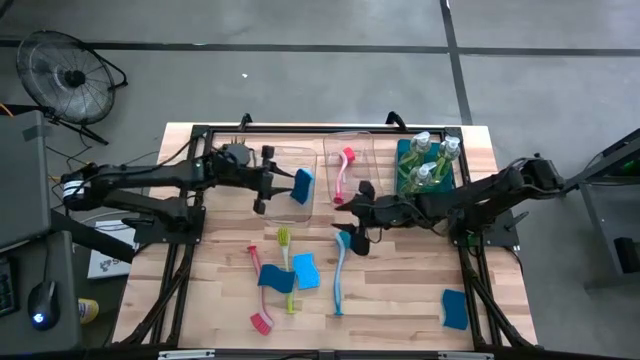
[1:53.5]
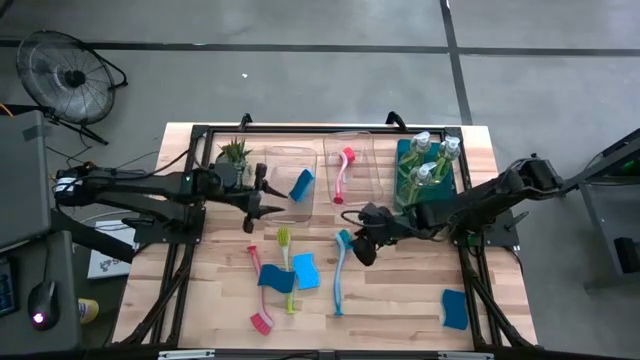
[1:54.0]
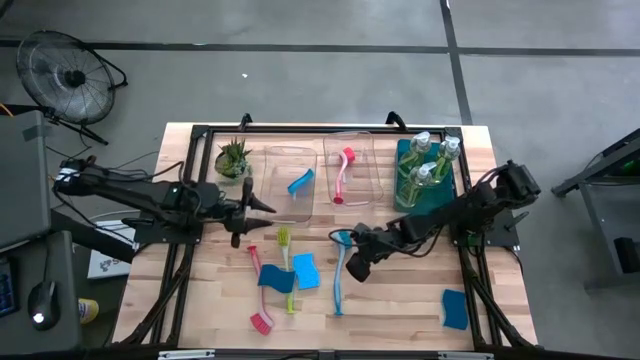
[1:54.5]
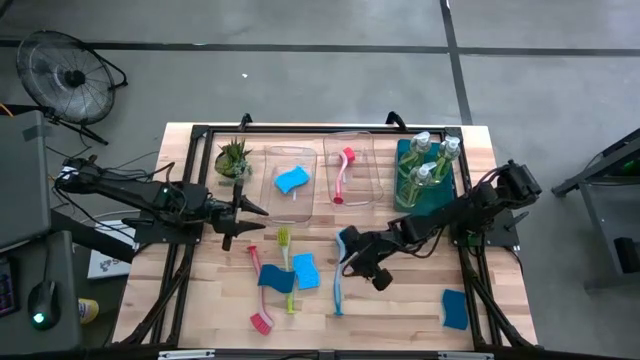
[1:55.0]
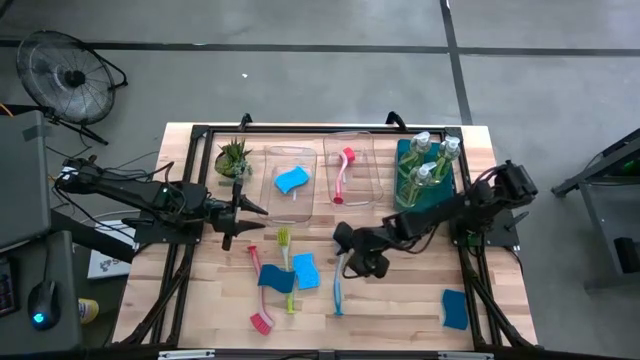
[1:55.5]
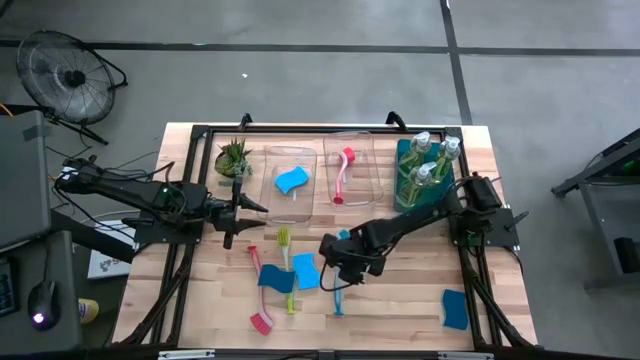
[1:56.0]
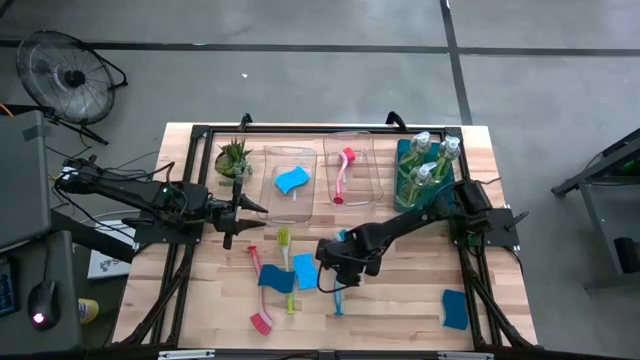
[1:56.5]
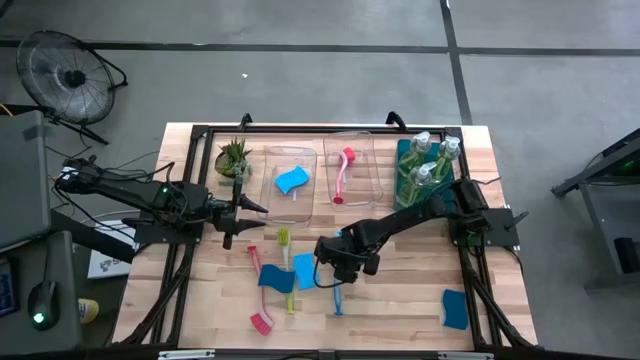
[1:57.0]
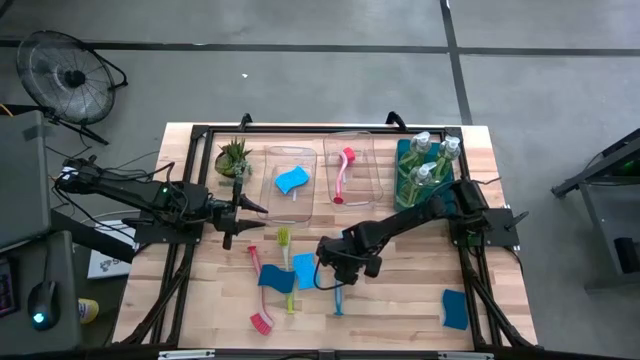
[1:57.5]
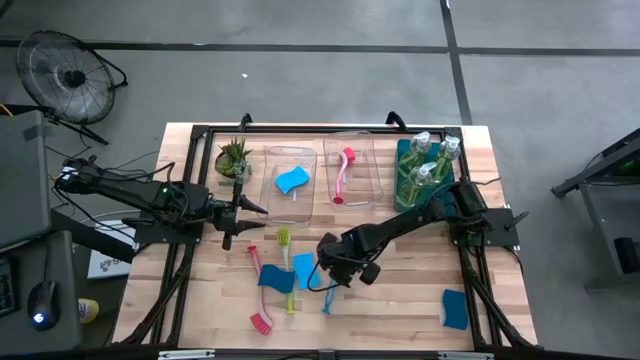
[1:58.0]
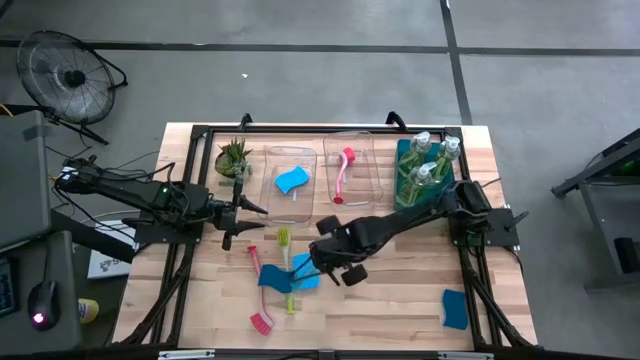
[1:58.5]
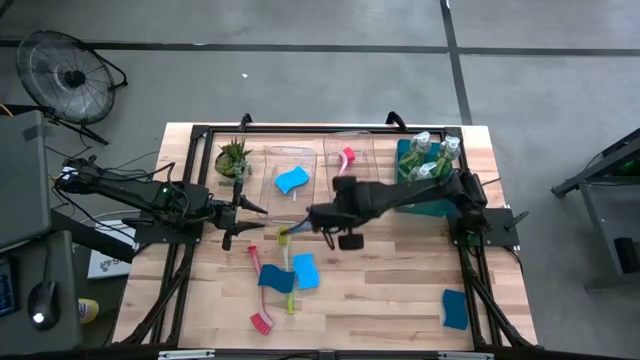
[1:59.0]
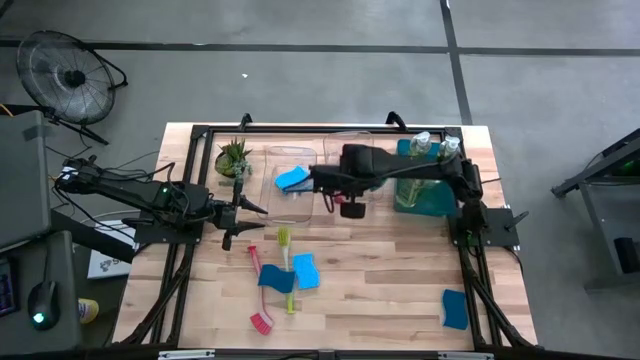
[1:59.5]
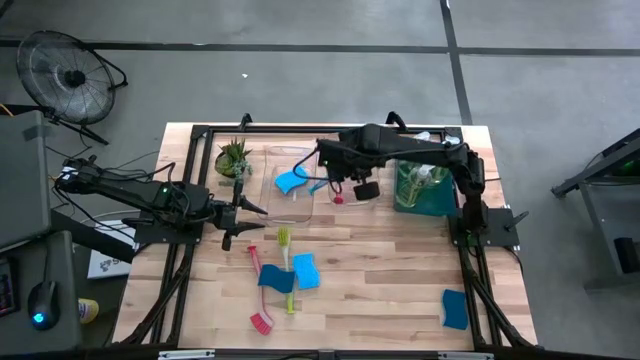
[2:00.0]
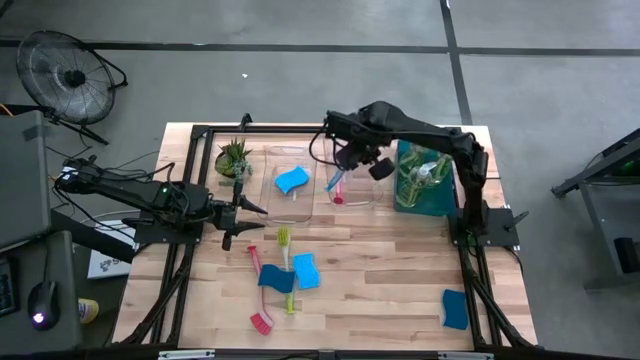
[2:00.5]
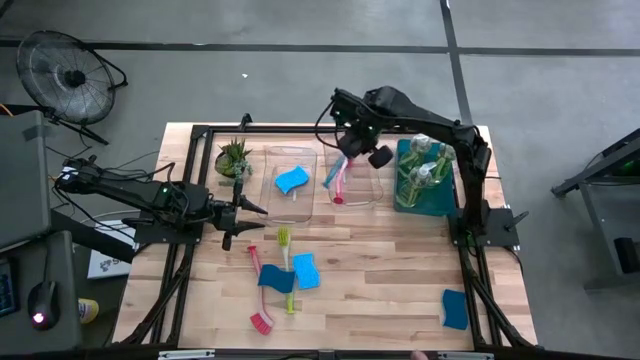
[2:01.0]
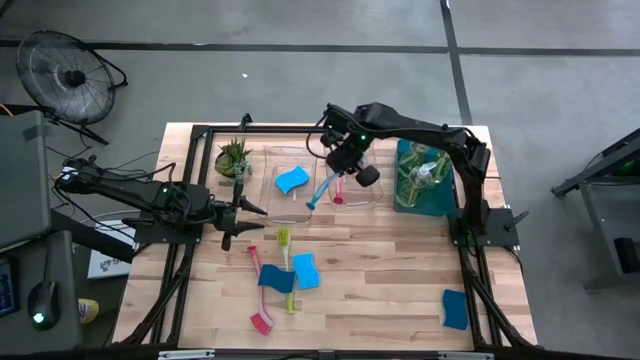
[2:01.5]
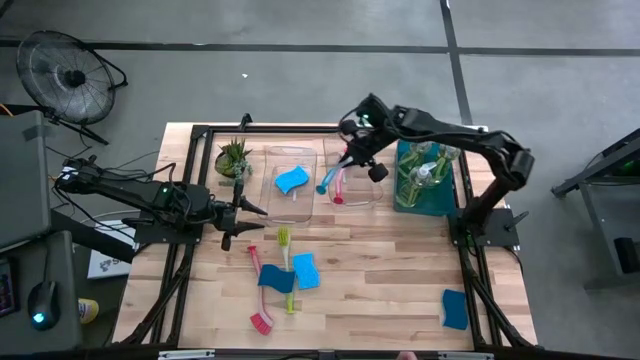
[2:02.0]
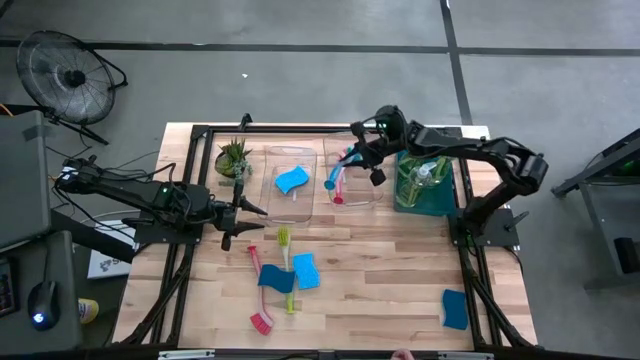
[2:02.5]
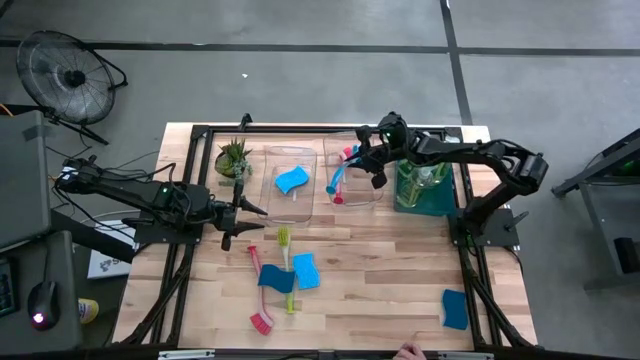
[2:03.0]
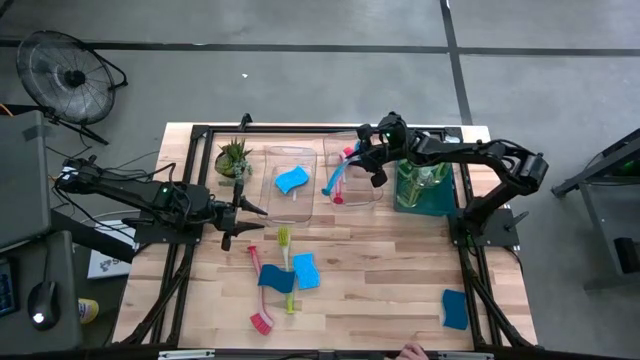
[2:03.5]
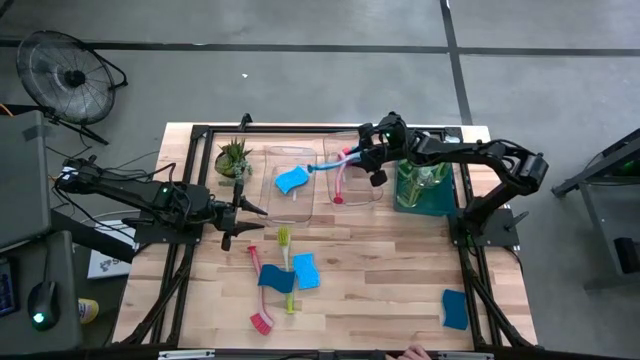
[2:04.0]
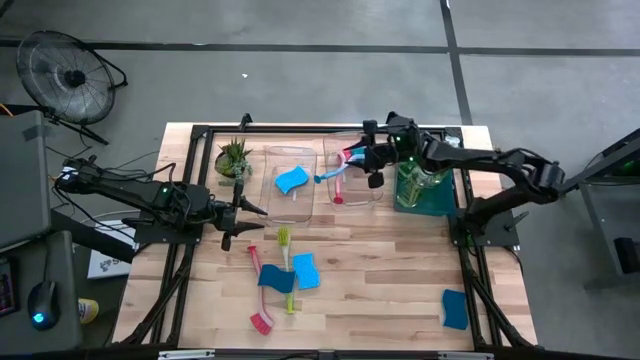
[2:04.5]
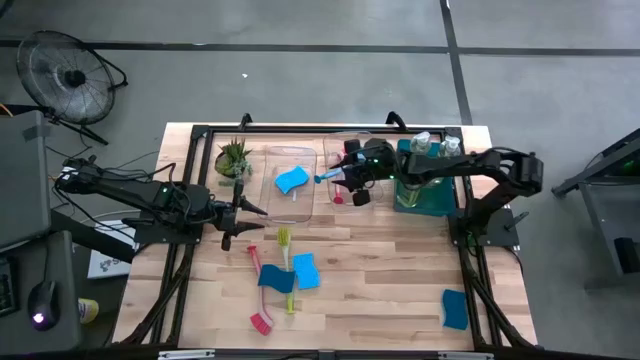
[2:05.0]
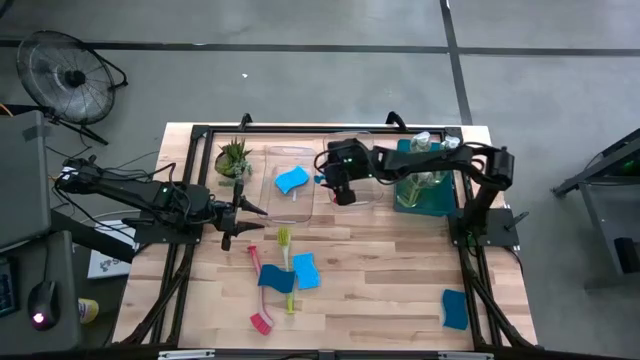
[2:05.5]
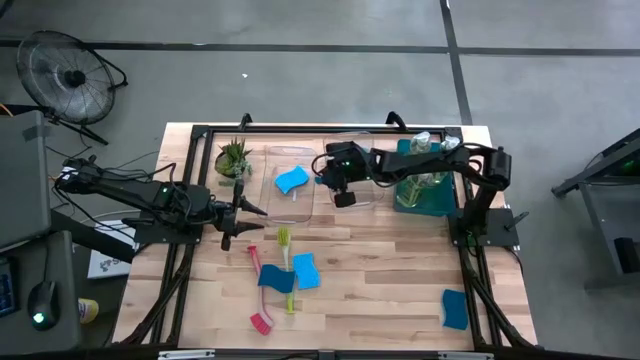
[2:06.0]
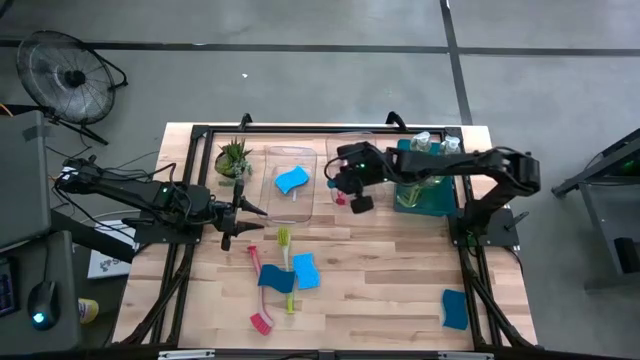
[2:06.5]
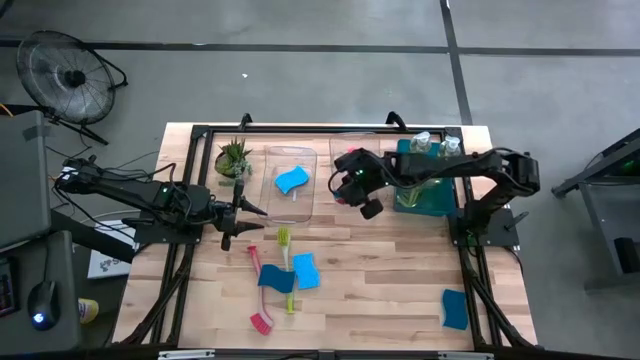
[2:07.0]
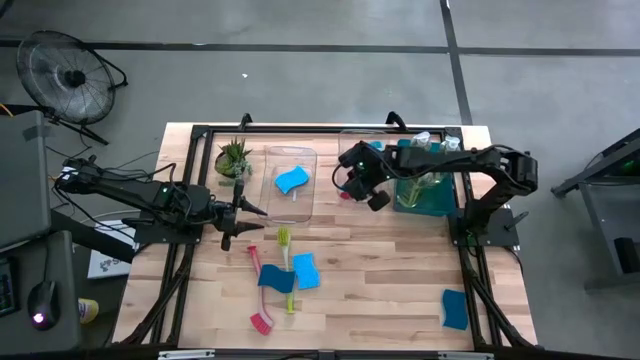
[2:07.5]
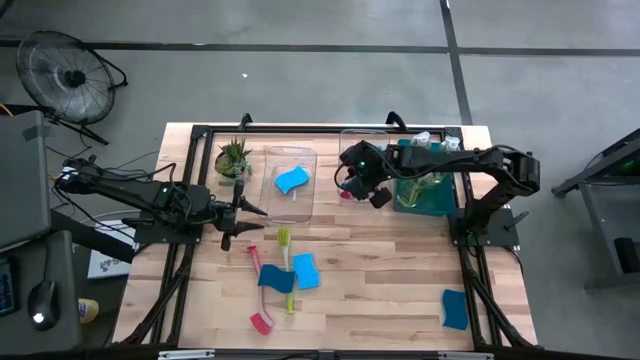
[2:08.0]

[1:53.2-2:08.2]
Task: Pick & Place Kitchen Sink Supplies
Put the blue dishwashing brush into the right transparent bin

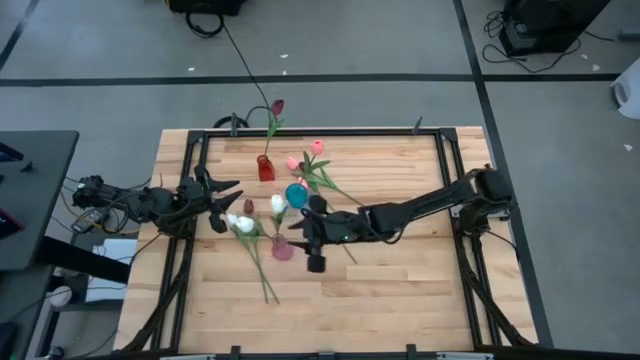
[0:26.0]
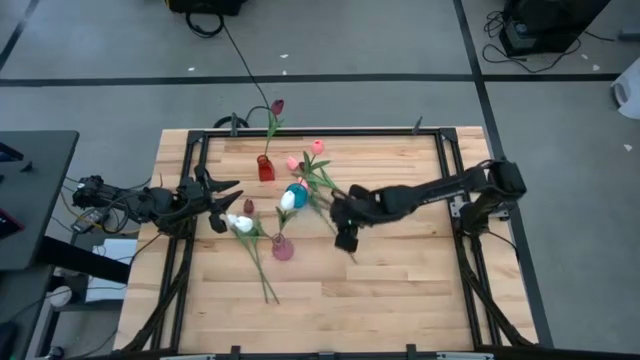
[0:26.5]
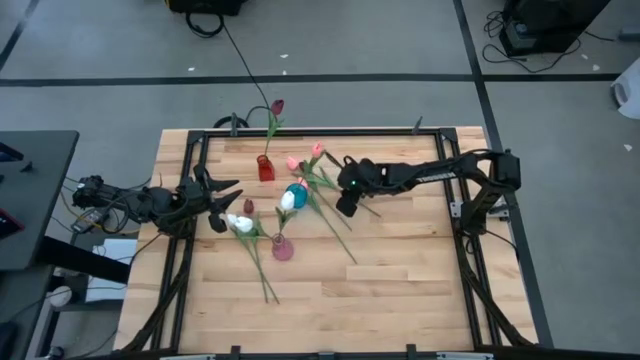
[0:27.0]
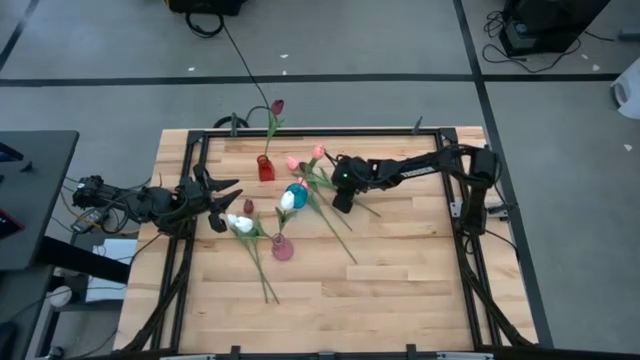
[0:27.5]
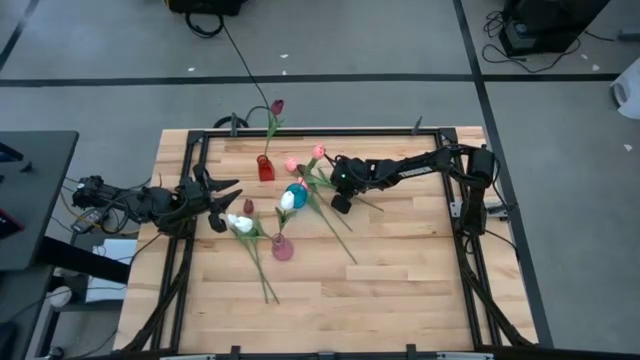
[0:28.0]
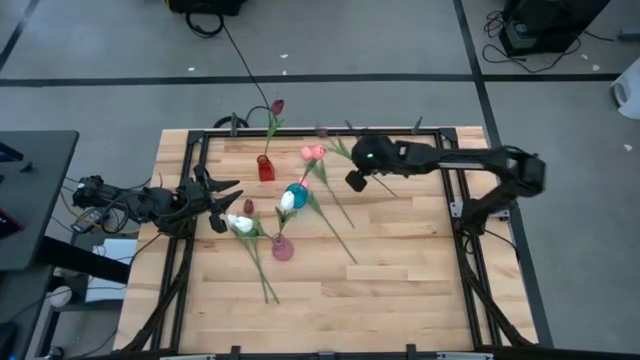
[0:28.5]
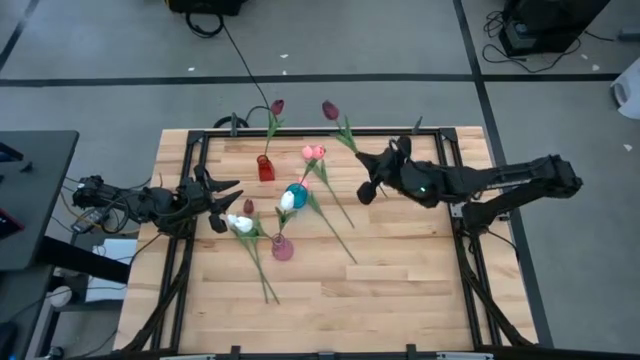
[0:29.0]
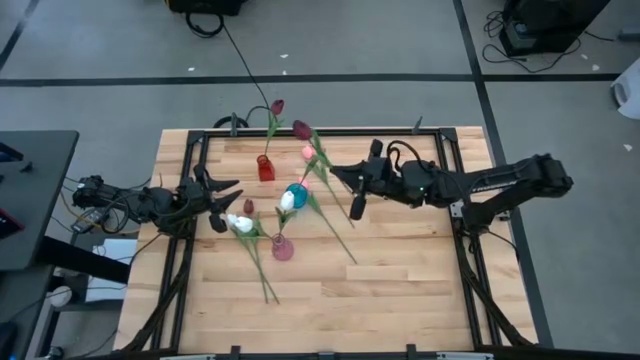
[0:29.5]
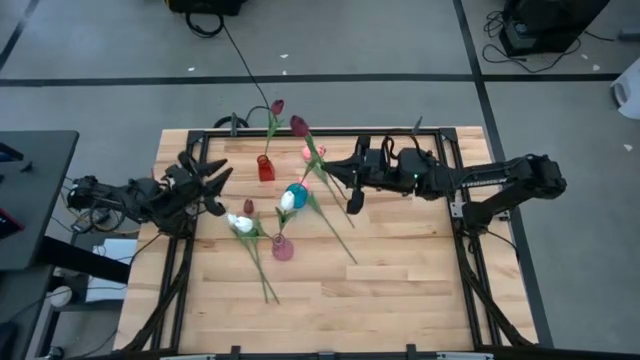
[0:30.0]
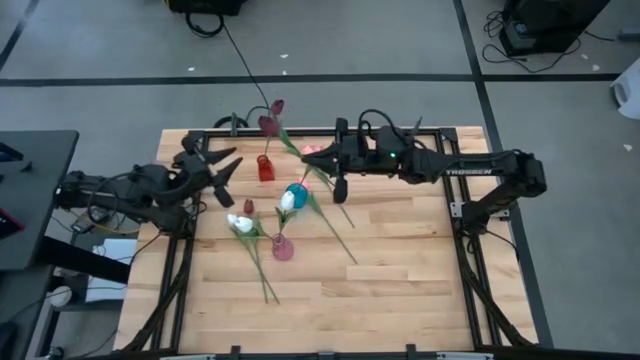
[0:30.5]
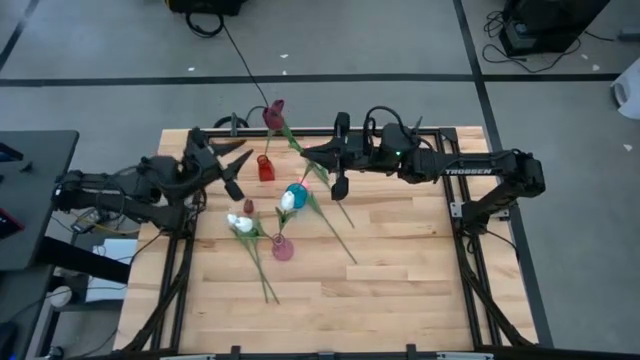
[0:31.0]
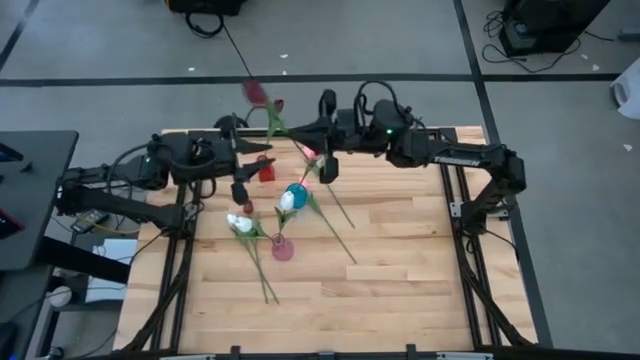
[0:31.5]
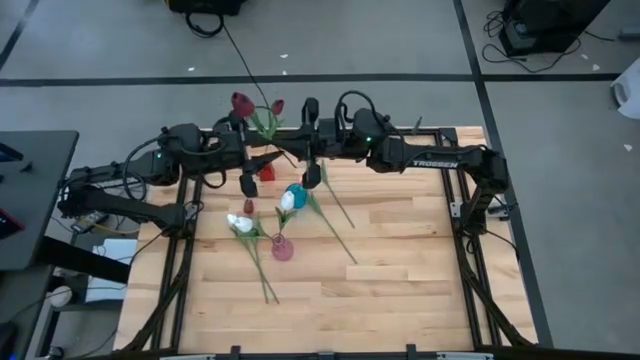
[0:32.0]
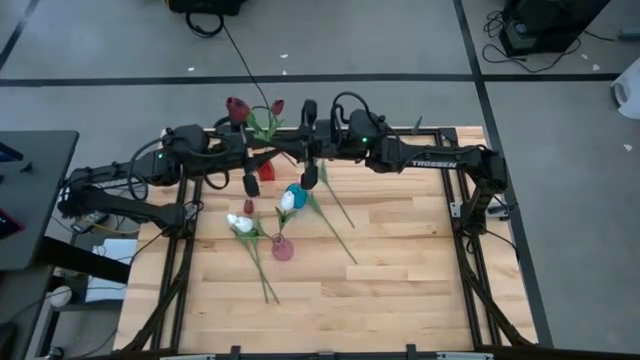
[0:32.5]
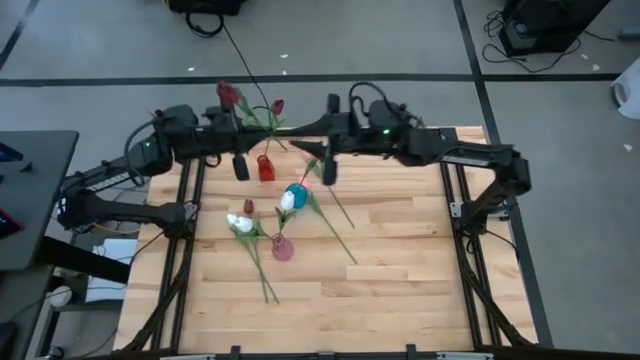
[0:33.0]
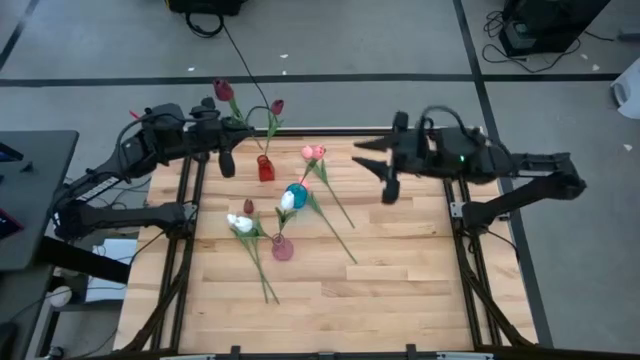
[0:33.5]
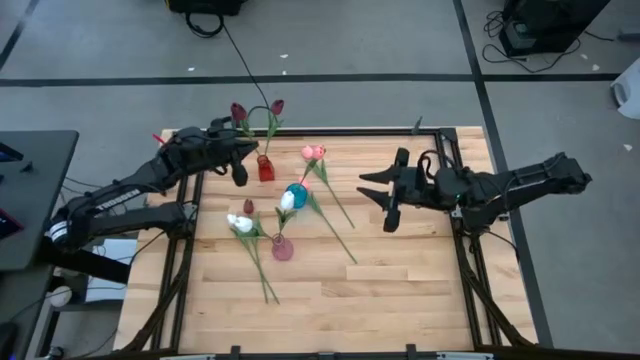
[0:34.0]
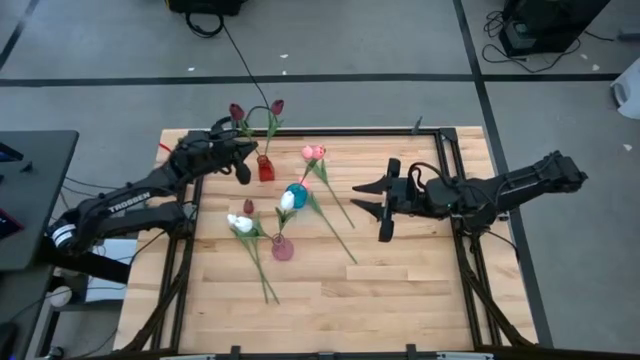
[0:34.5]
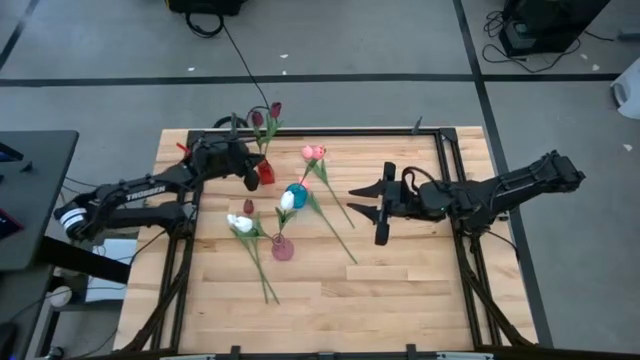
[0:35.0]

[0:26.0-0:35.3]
Task: Sort flowers into vase by color
Put the top red tulip into the red vase
